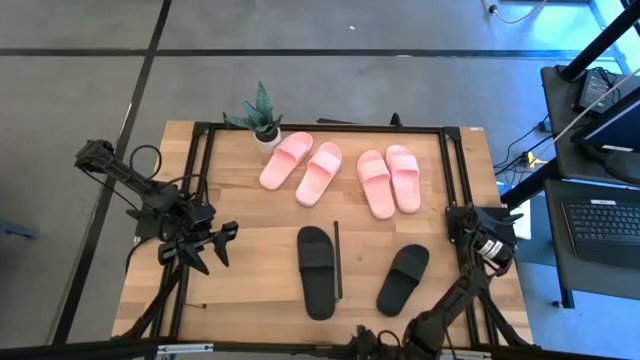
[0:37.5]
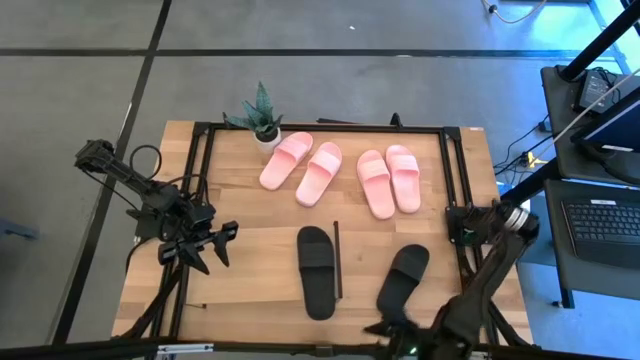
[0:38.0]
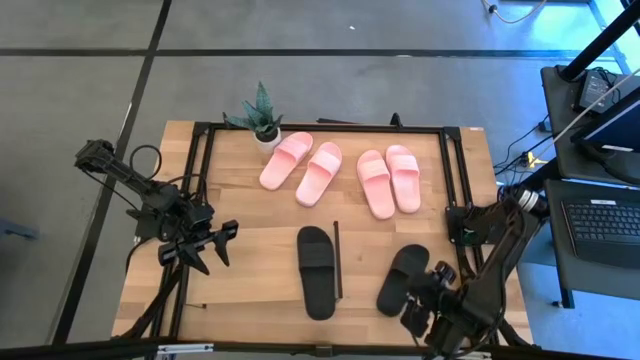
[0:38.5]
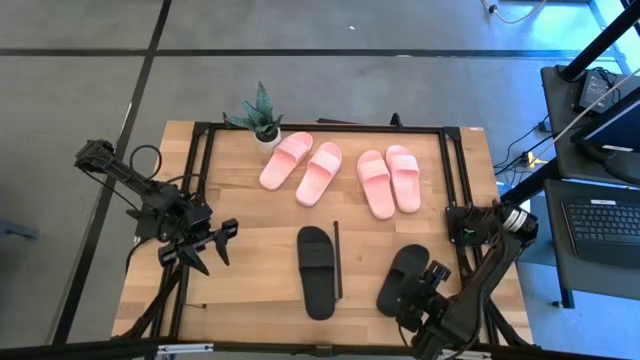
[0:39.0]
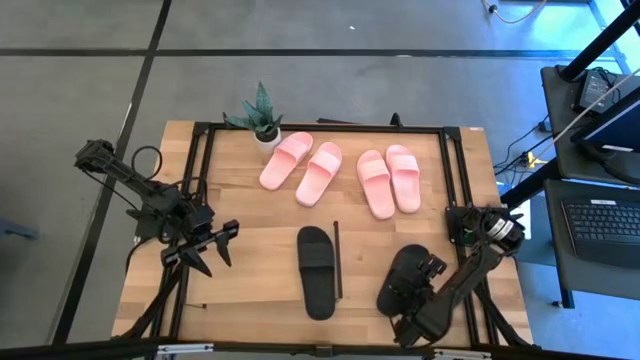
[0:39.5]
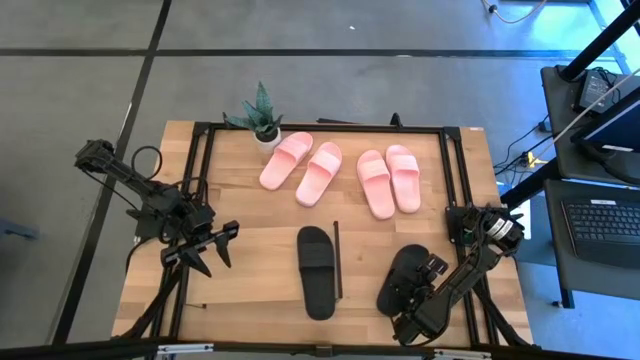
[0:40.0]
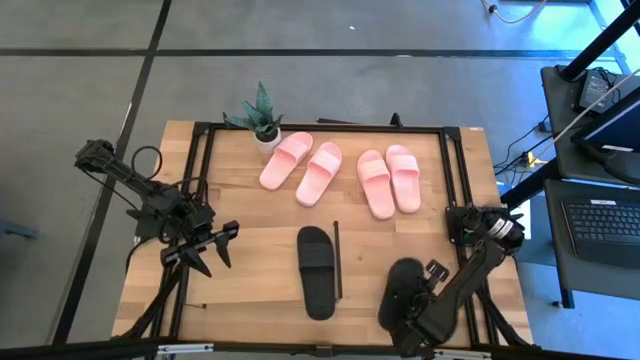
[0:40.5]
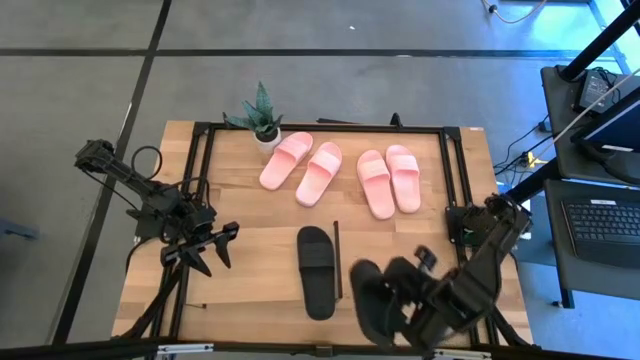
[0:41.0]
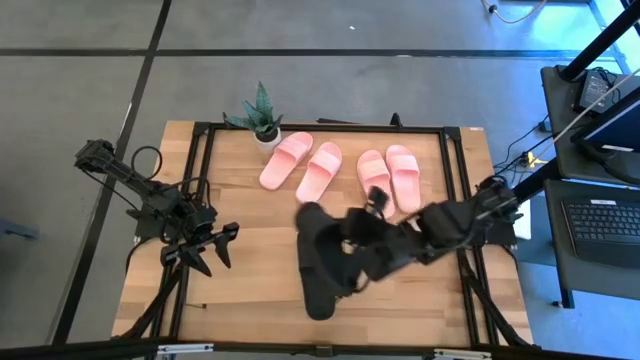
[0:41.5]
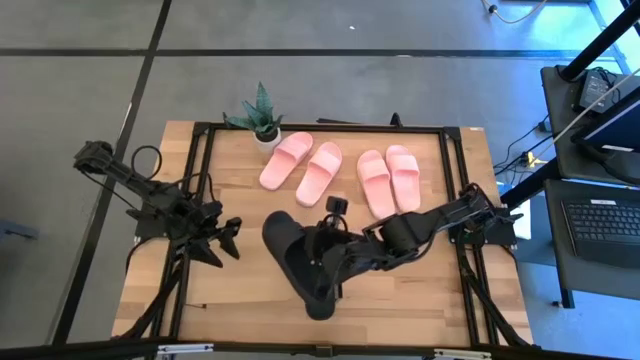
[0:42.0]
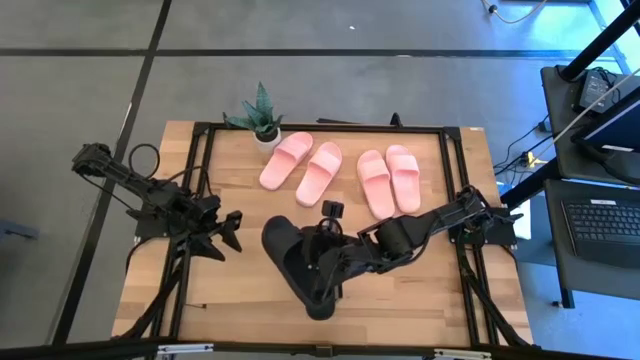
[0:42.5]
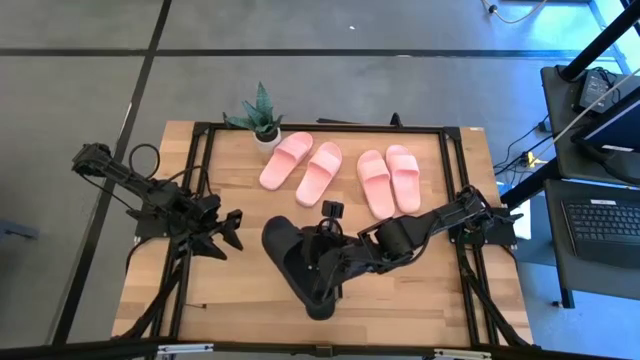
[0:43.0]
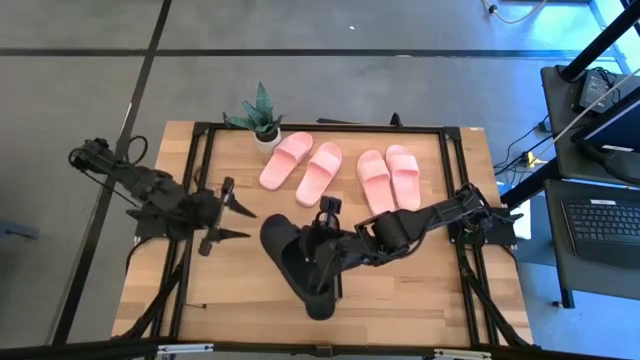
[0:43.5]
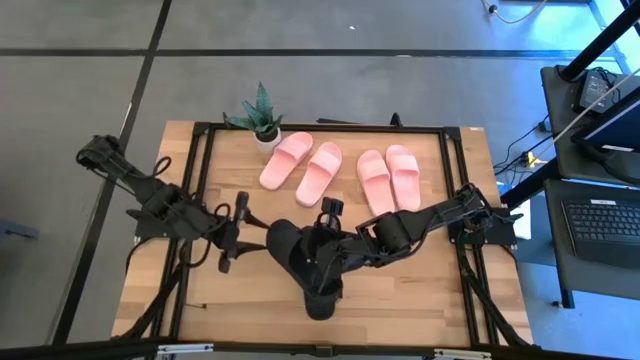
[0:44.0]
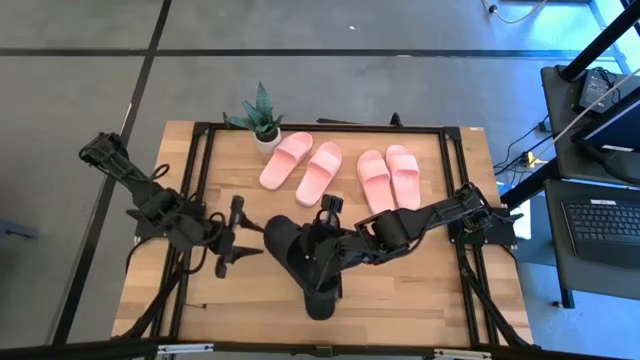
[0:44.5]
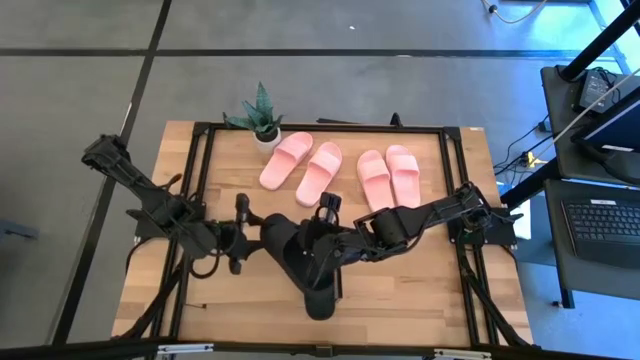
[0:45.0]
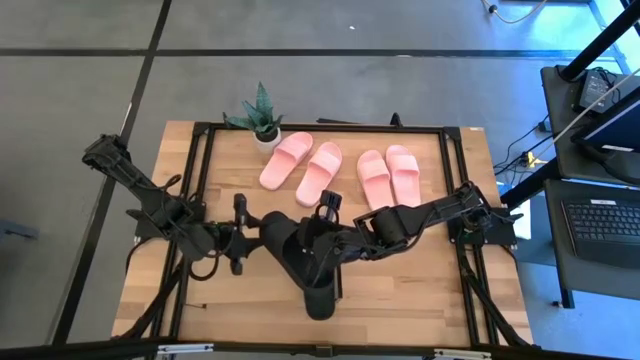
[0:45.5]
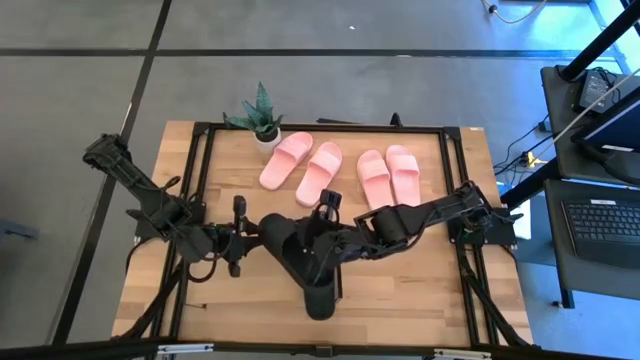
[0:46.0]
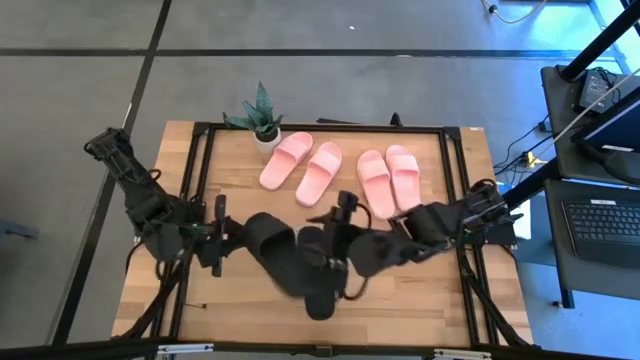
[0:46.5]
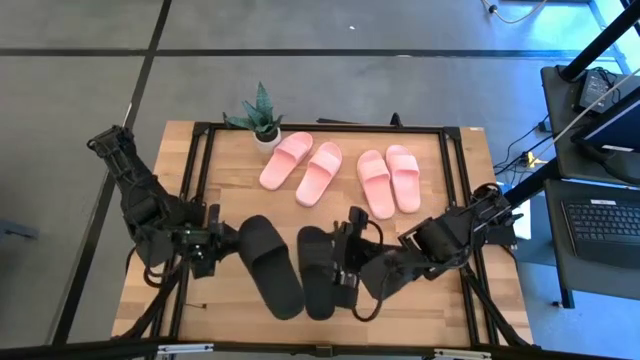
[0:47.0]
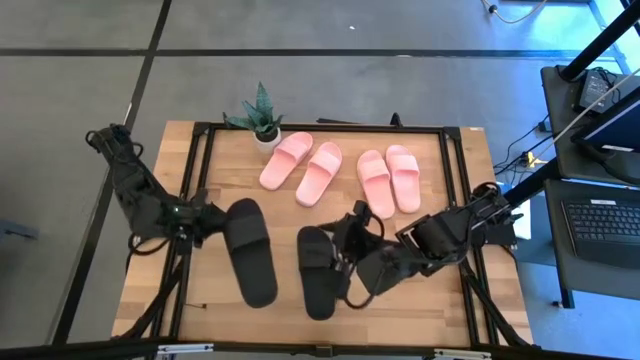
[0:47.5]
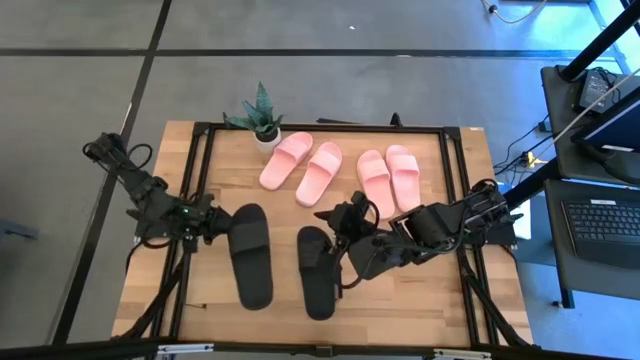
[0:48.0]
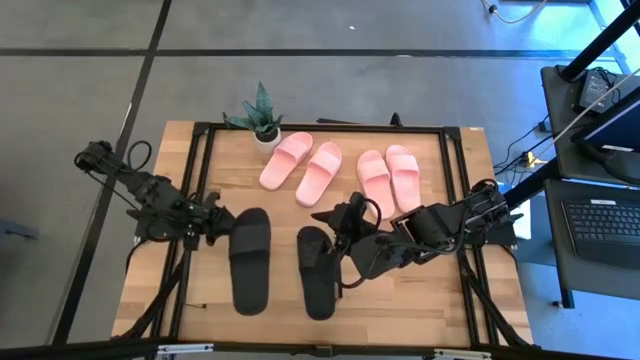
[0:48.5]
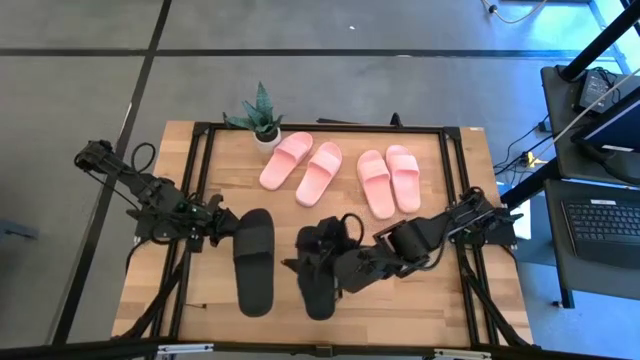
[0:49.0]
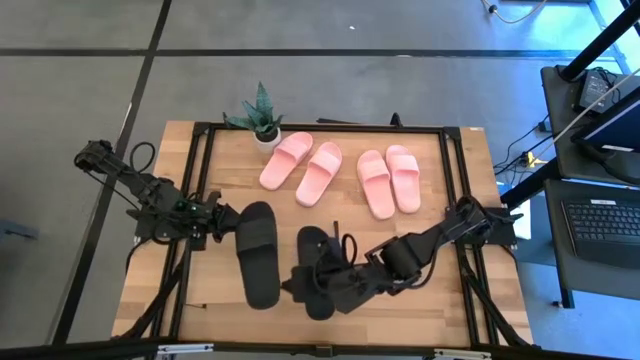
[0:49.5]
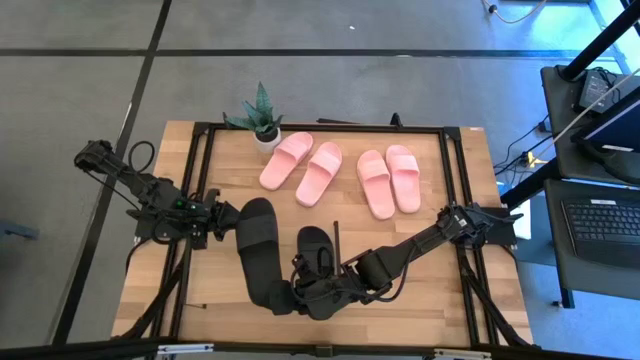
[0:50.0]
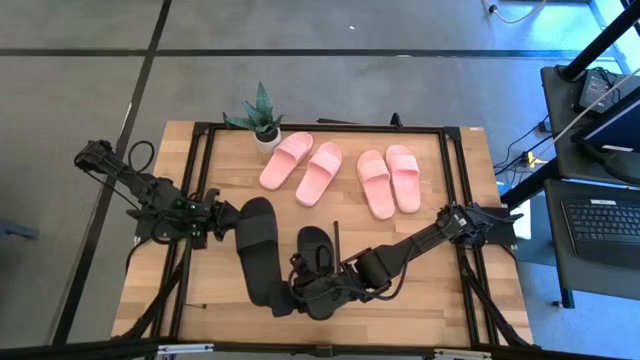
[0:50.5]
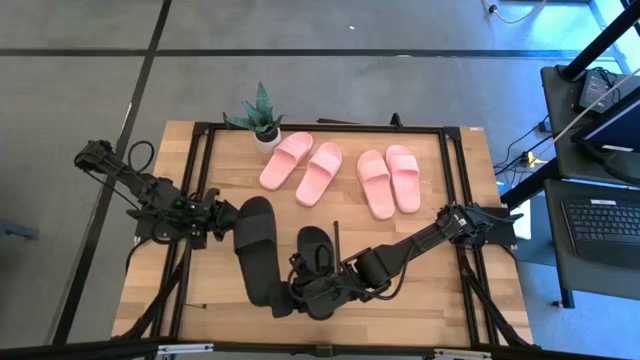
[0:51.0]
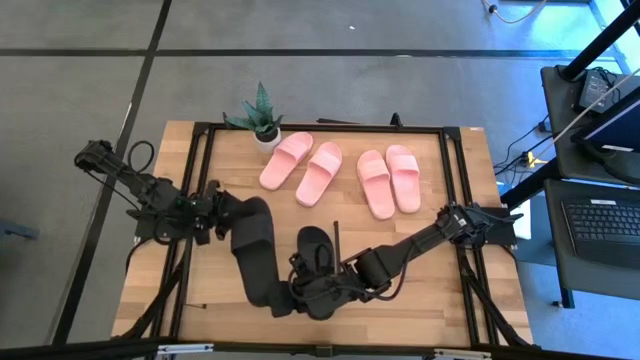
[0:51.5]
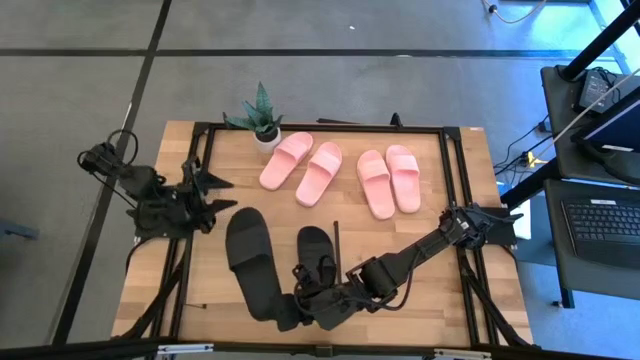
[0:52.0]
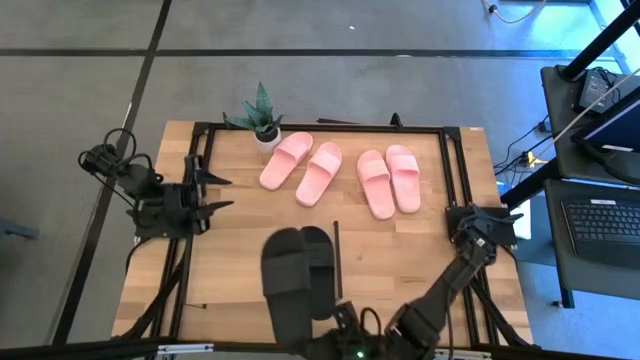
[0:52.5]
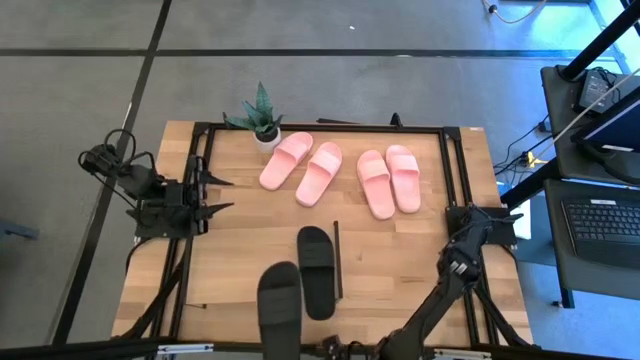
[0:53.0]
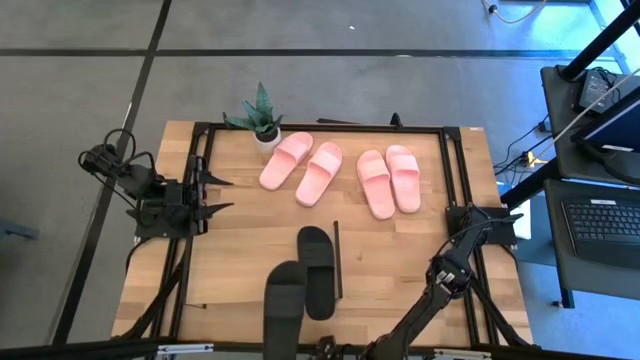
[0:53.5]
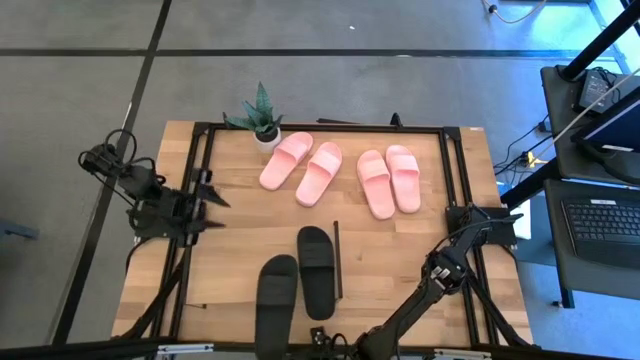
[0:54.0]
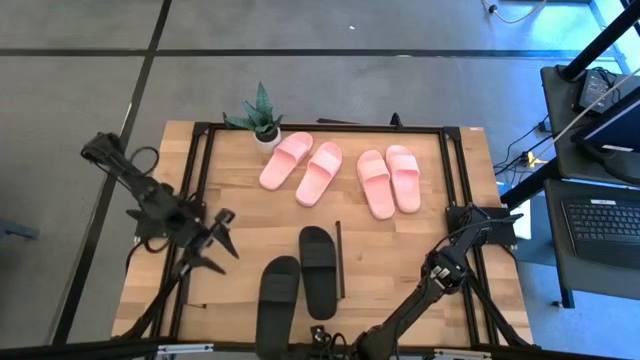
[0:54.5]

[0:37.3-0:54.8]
Task: Pick and place slides into the shelf
Put the black slide on the shelf

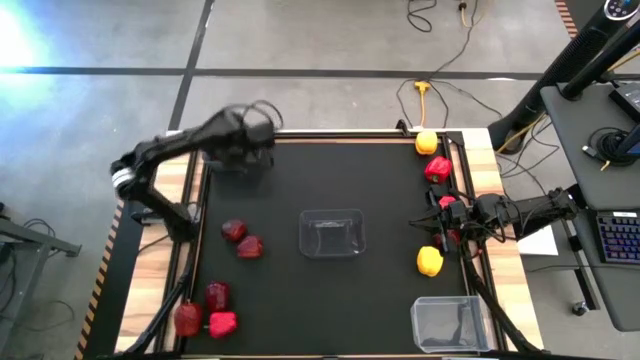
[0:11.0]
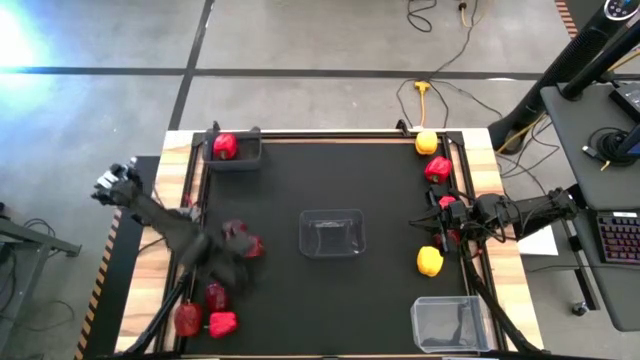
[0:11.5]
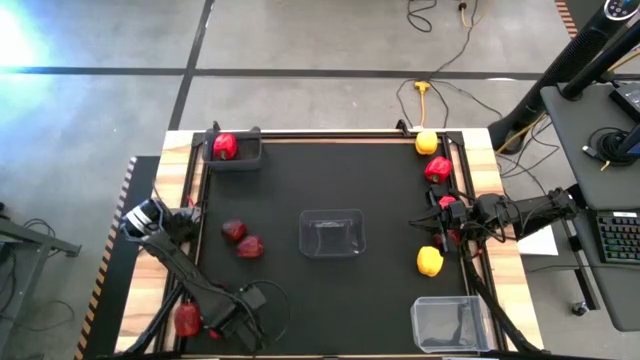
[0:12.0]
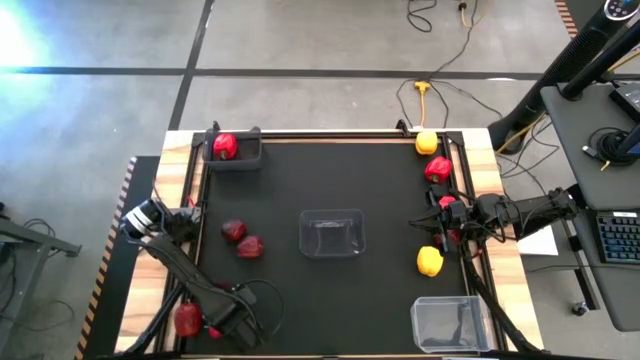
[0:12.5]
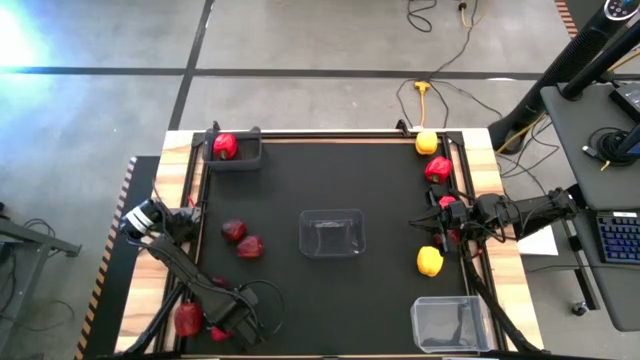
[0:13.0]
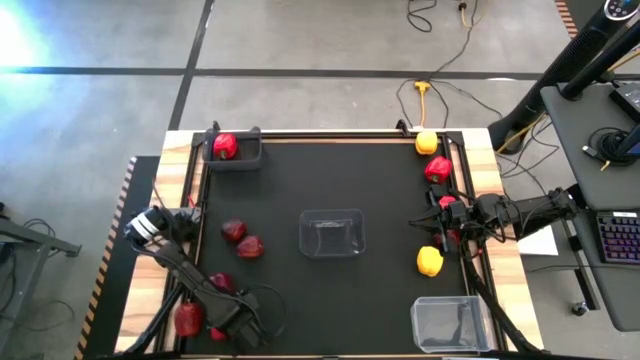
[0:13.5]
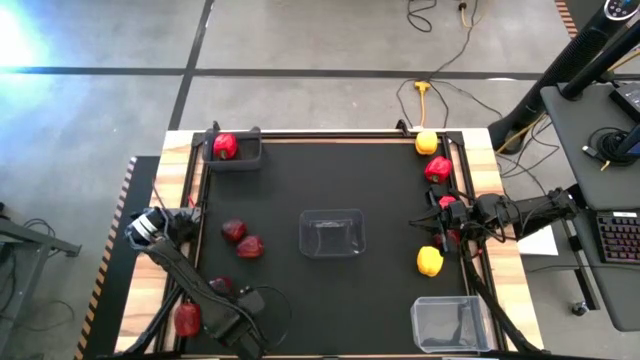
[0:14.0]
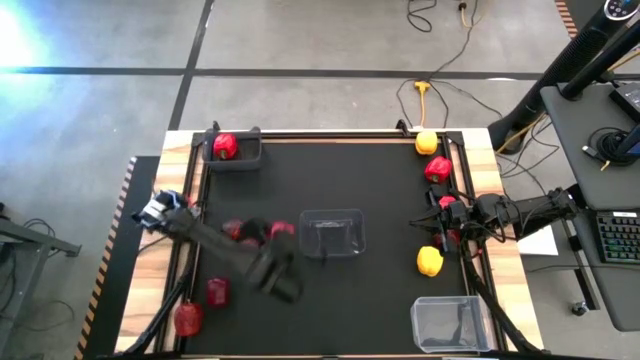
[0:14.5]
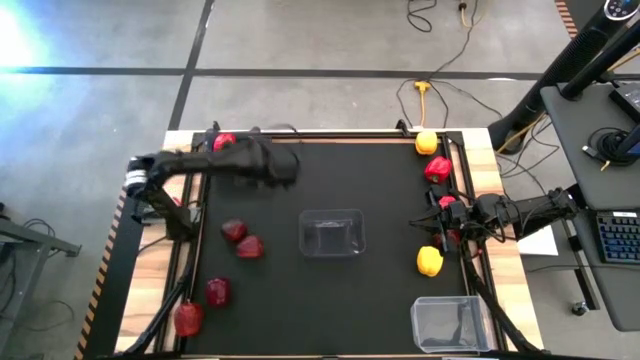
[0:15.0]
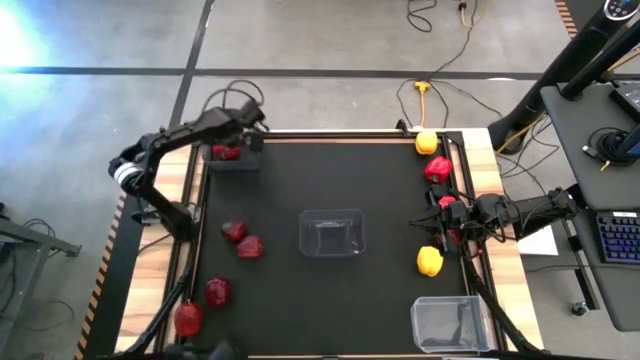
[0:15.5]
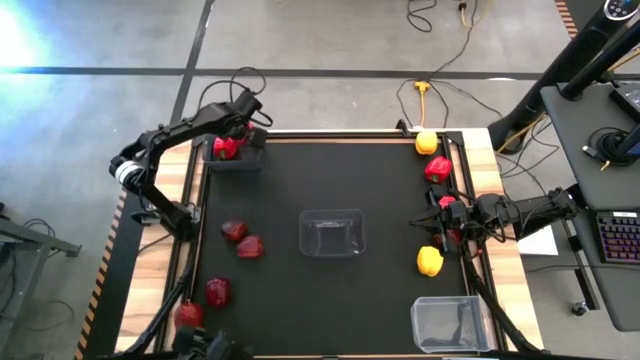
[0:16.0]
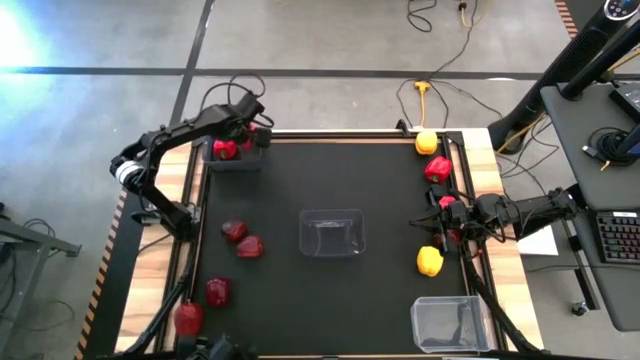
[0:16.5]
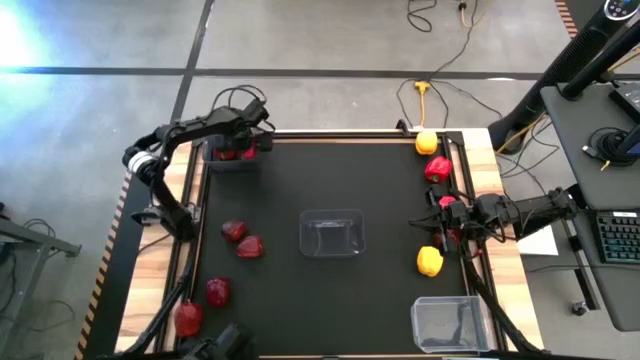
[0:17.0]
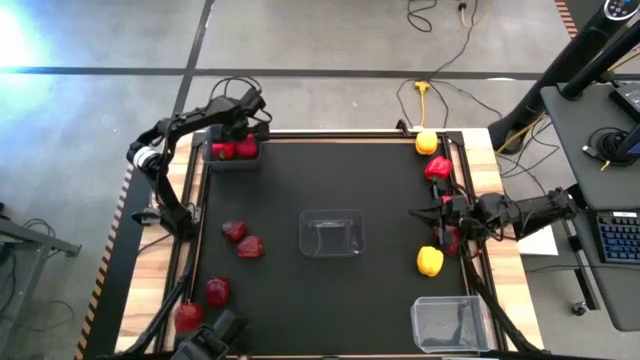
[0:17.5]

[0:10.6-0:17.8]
Task: Sort produce into baskets
Put the red bell pepper into the top black bin
